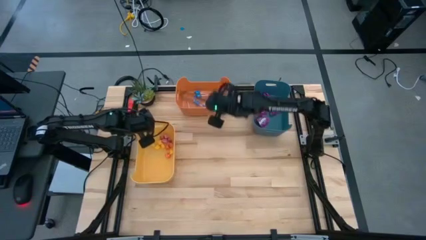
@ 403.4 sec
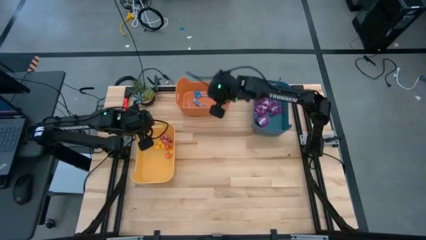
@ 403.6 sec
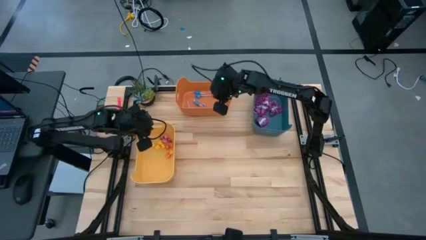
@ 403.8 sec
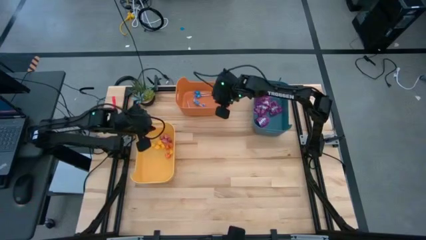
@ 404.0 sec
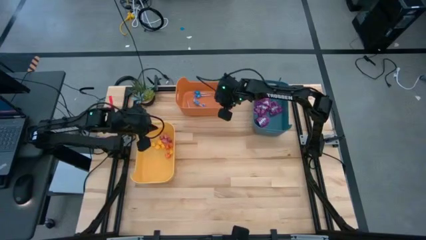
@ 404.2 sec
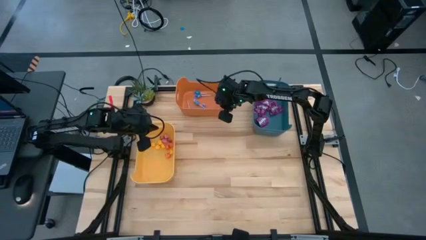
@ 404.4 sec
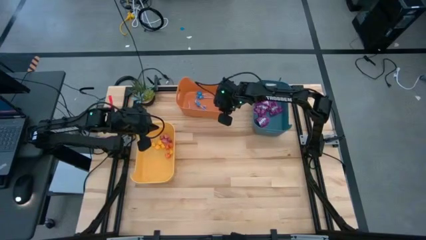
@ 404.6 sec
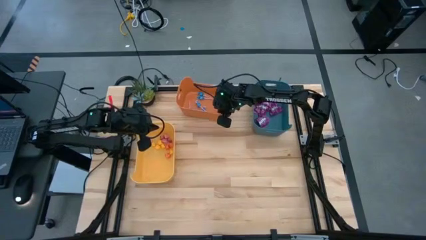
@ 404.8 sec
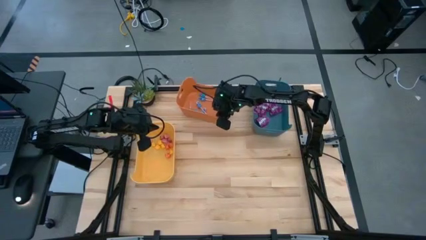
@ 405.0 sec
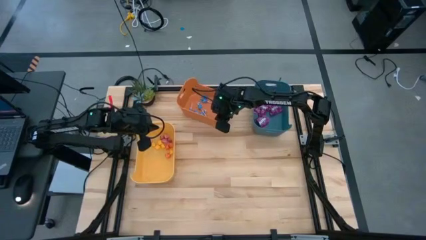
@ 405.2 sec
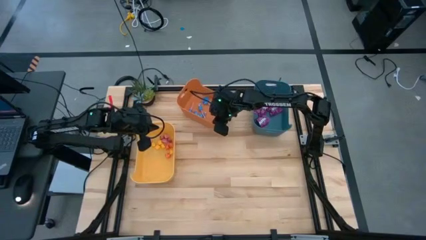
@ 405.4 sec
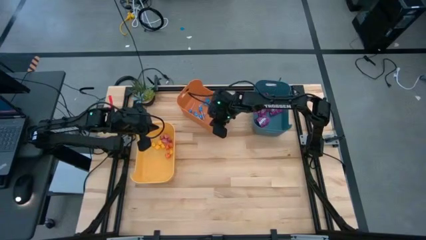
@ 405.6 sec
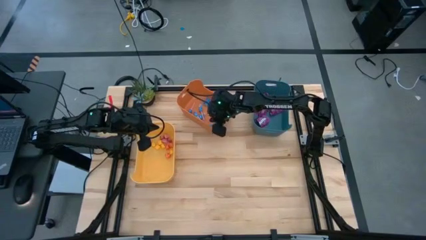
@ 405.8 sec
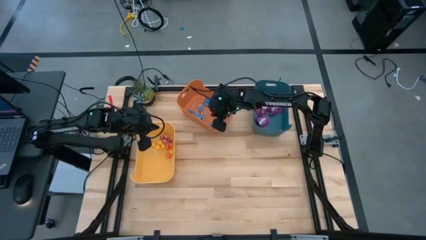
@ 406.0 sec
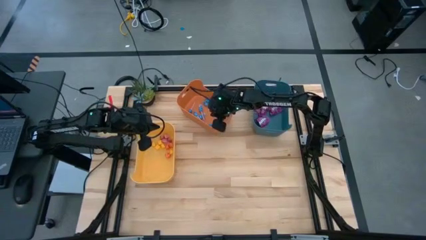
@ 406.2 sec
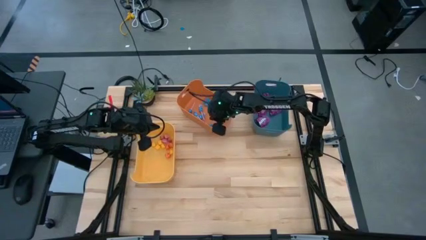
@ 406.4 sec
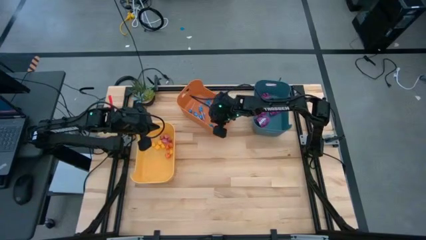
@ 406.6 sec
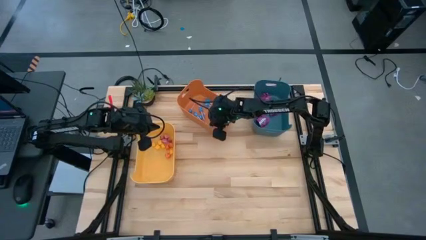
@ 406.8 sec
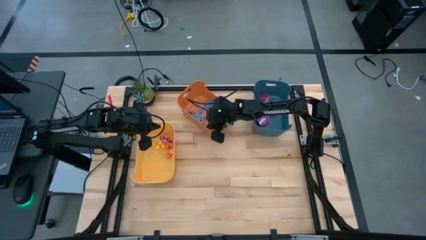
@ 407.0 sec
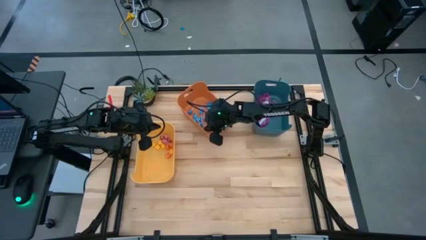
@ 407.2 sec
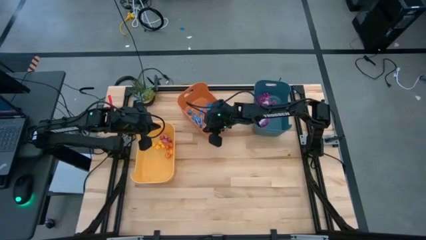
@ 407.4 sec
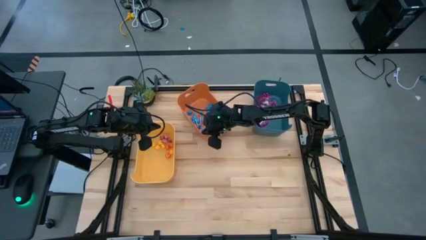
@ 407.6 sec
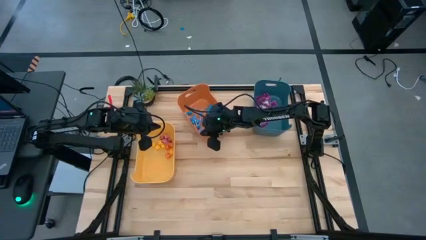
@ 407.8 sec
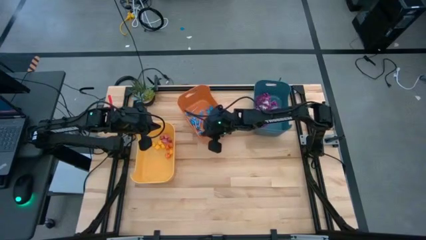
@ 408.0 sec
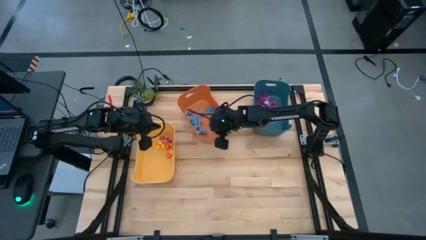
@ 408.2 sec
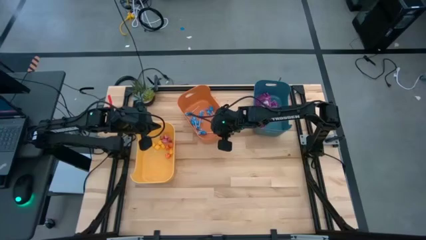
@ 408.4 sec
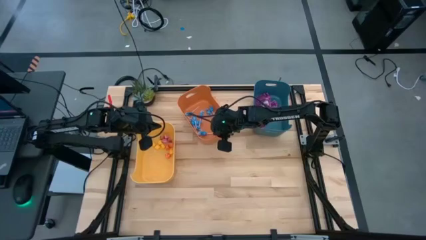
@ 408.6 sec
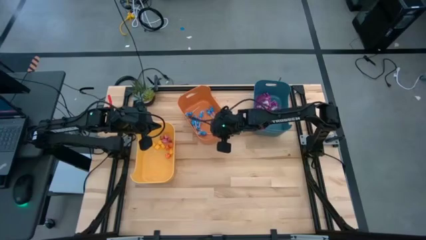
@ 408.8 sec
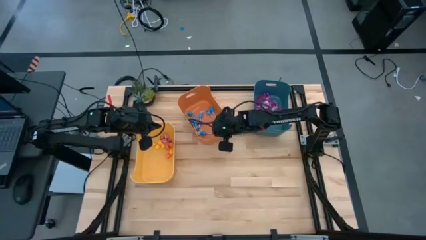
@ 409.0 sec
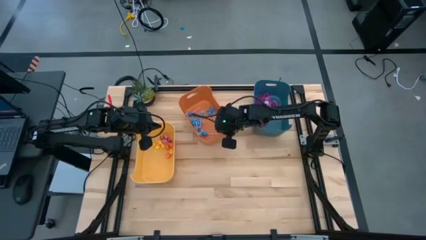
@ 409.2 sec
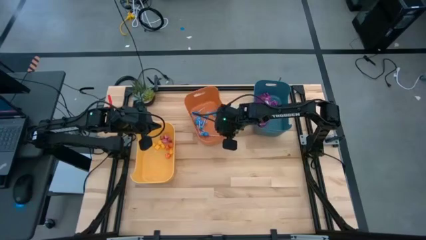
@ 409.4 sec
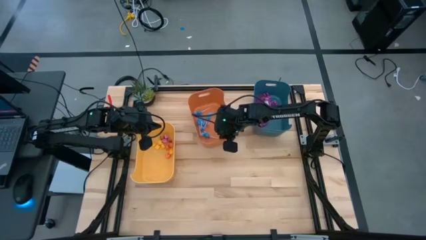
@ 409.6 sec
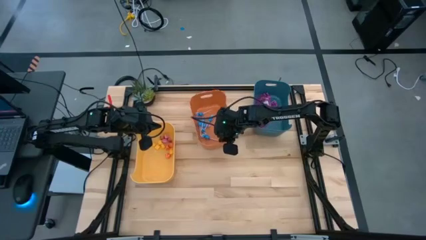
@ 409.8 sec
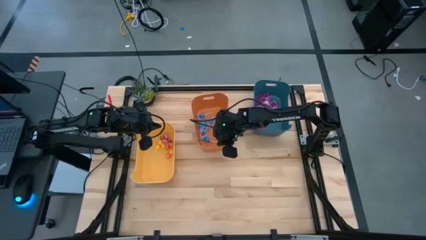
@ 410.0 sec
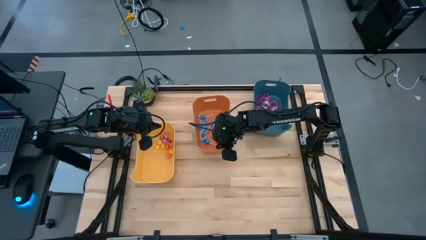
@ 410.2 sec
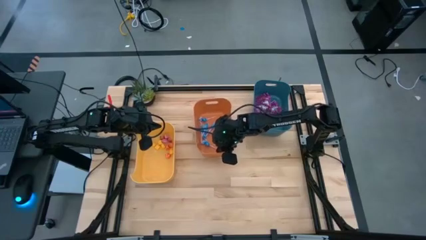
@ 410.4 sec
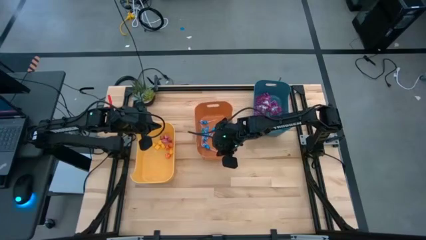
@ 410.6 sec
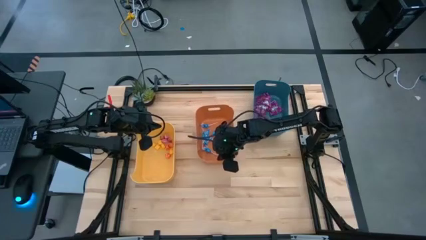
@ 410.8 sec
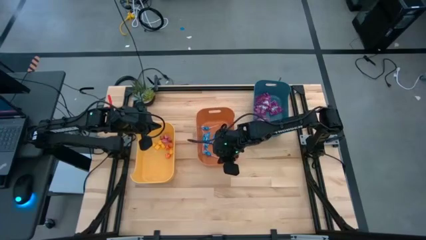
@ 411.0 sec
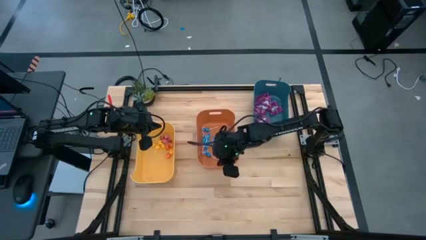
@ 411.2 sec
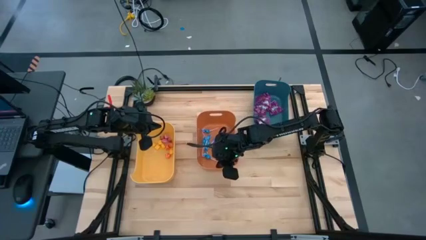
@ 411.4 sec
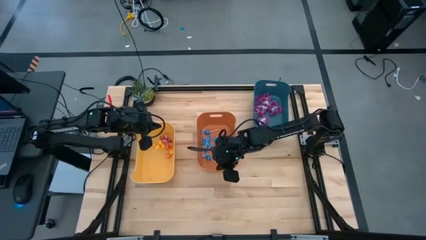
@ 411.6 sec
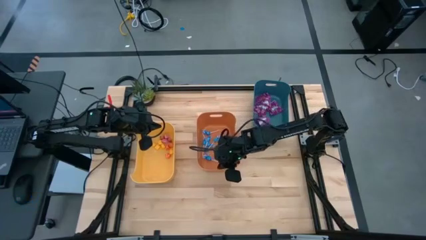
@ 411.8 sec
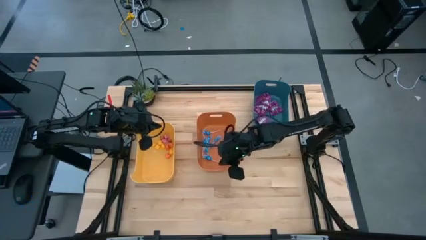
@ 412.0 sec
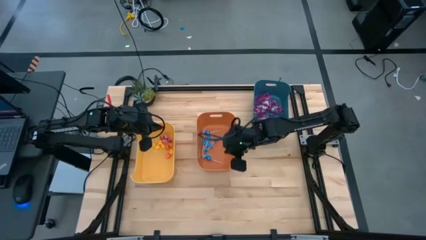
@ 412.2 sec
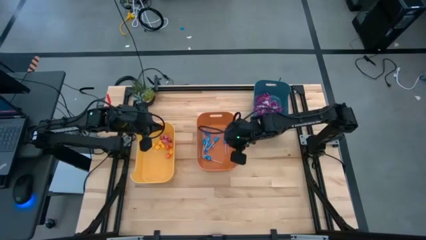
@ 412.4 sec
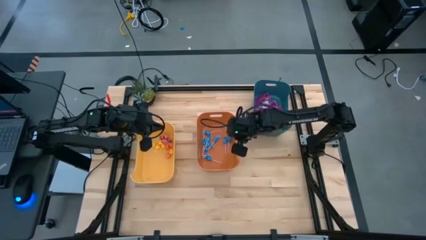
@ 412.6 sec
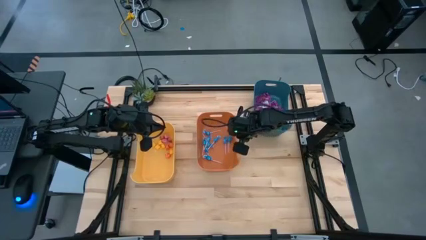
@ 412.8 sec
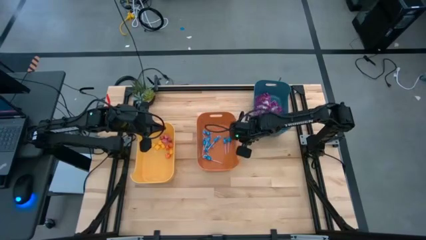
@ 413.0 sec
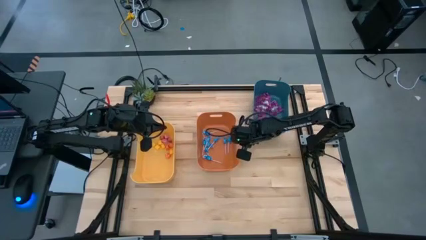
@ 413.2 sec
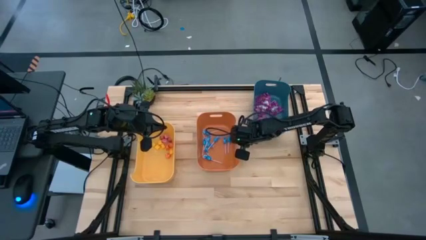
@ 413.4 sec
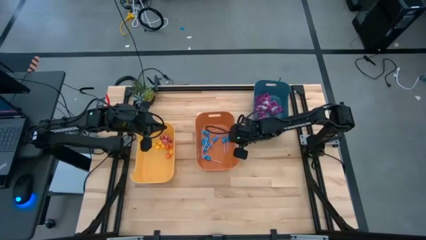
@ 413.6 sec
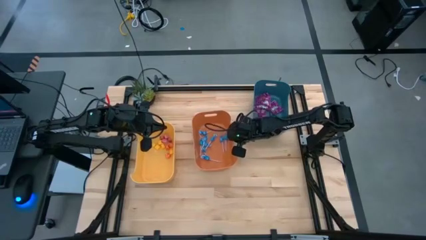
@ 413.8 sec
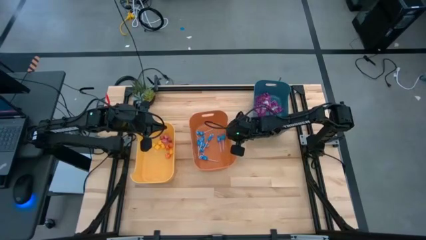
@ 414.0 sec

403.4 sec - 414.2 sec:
Task: Sort candy
Move the orange bin beside the yellow bin

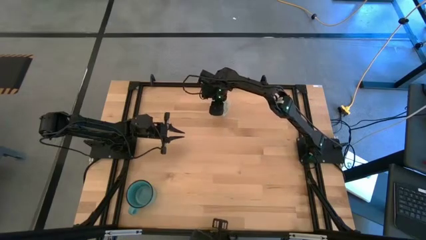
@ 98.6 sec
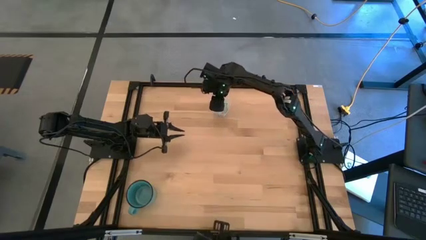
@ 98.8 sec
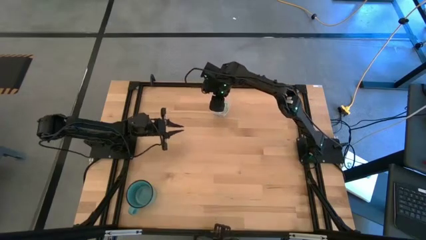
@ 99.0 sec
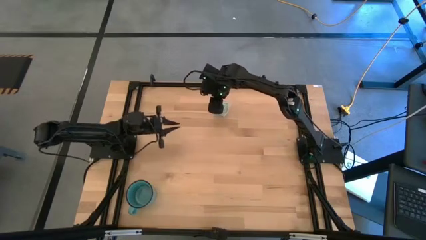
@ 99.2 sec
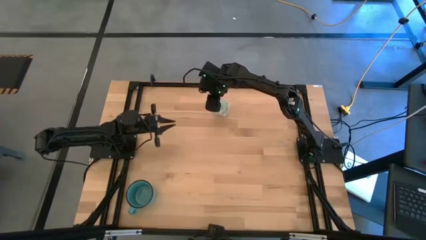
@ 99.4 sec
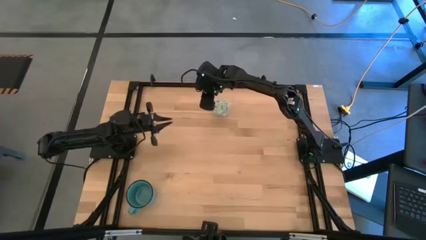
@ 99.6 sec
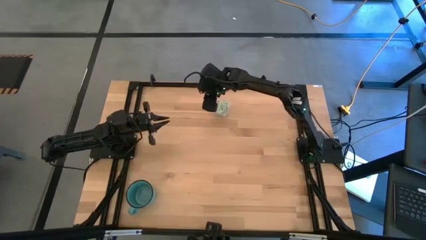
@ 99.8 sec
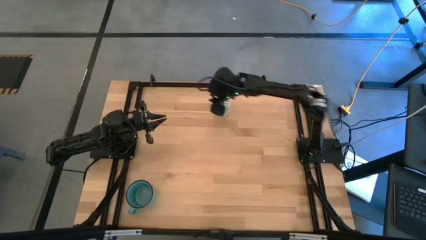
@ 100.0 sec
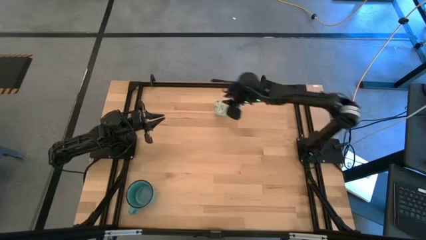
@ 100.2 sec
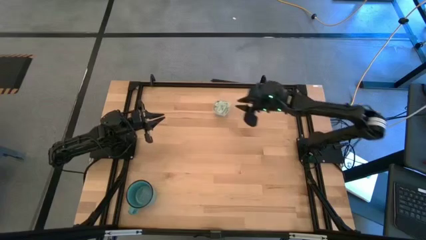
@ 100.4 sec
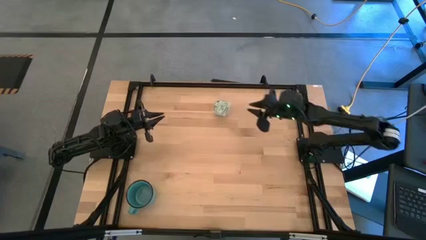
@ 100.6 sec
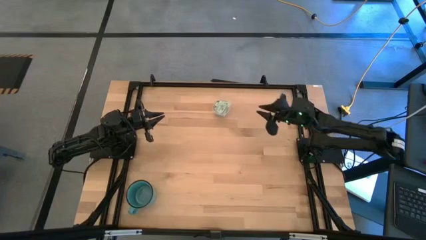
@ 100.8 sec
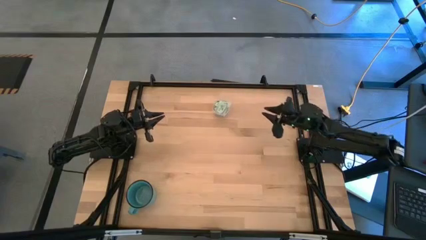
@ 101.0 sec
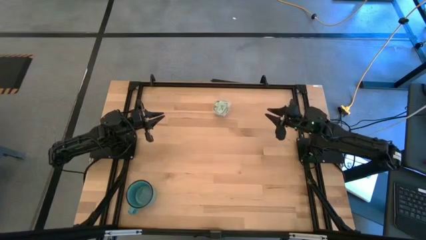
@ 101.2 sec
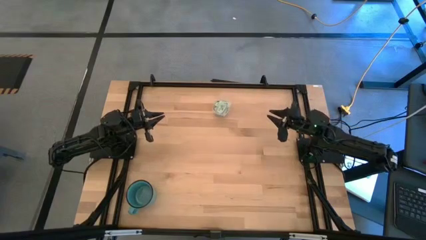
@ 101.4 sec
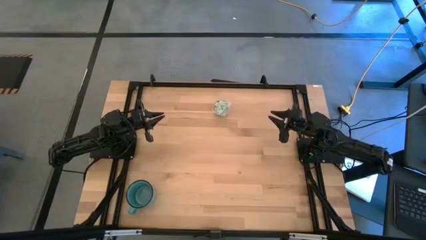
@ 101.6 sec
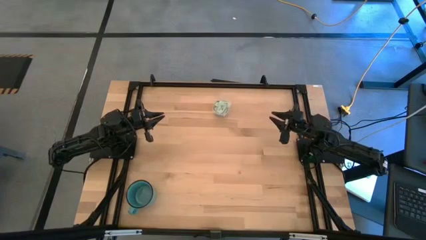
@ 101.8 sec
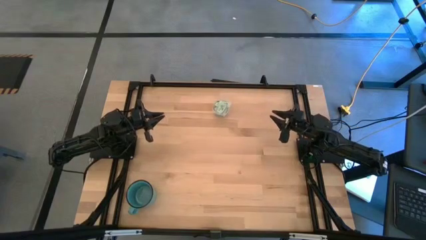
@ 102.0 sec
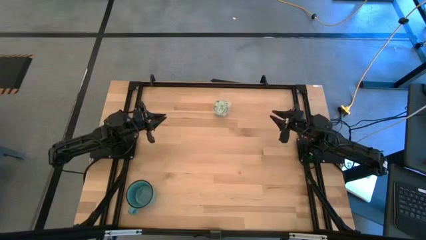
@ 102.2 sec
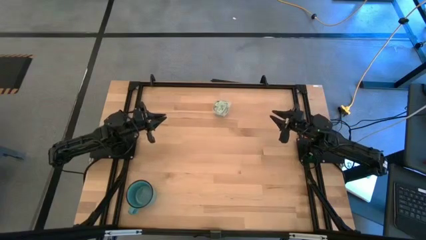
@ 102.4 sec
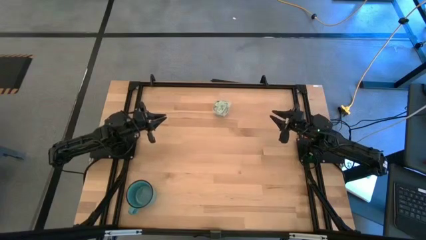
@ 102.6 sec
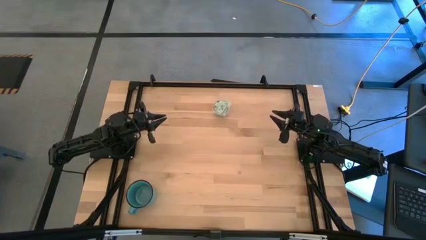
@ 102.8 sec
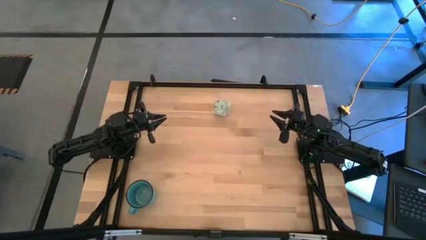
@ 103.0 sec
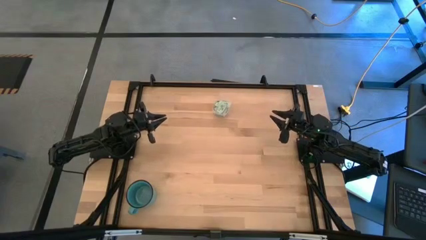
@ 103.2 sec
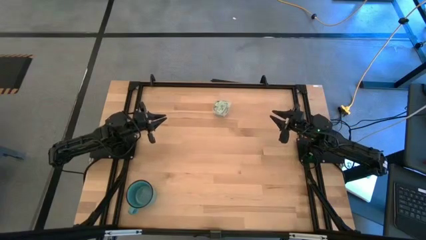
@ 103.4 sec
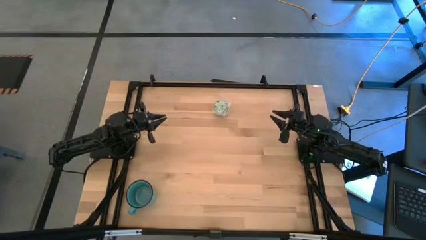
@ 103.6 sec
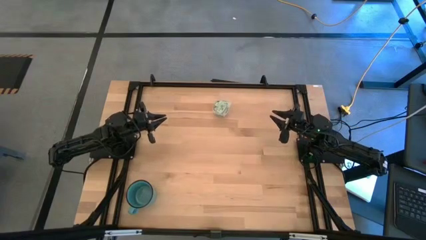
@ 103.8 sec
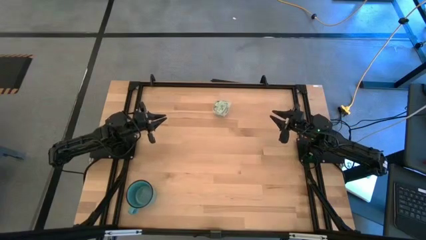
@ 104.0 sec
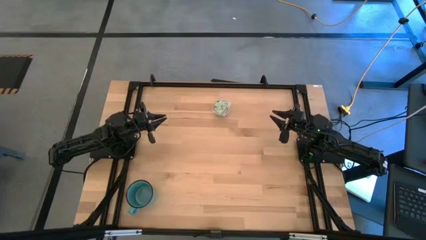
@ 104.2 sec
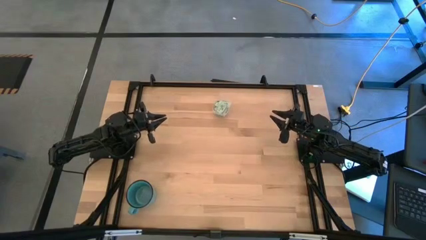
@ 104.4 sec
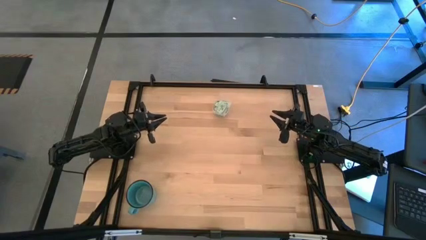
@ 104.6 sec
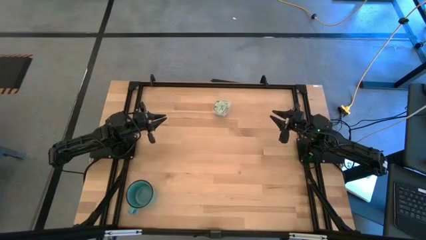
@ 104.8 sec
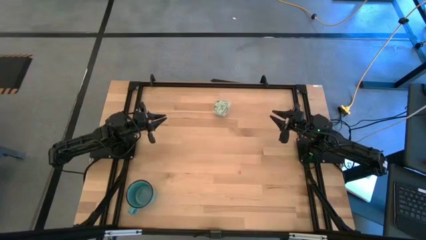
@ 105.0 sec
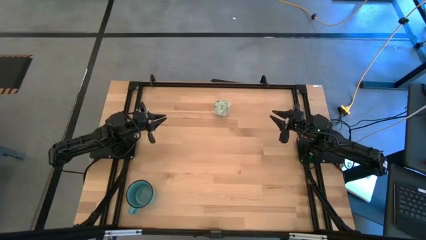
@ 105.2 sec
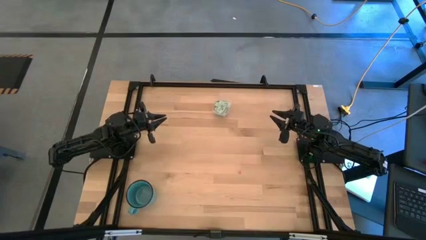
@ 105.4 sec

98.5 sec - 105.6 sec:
Task: Pick and place items into bin
Return to Home Position
